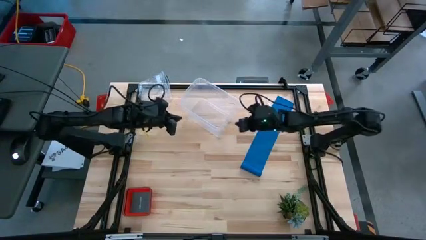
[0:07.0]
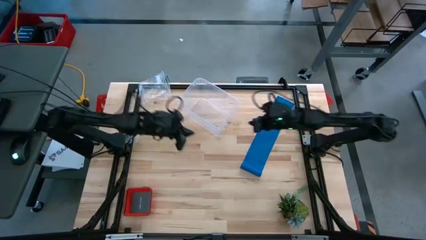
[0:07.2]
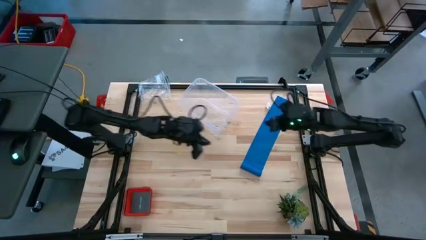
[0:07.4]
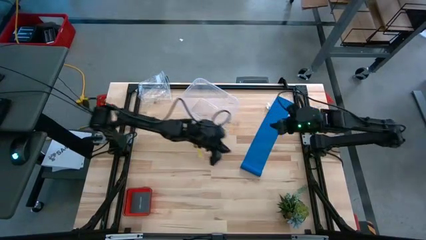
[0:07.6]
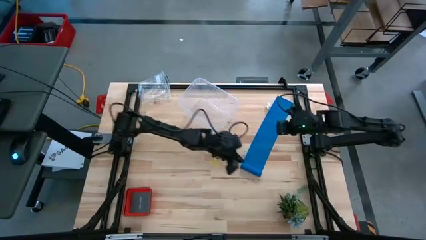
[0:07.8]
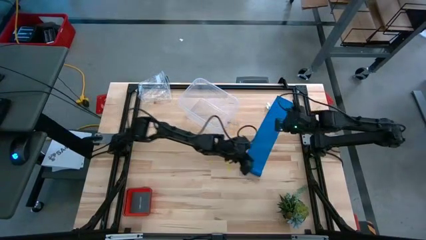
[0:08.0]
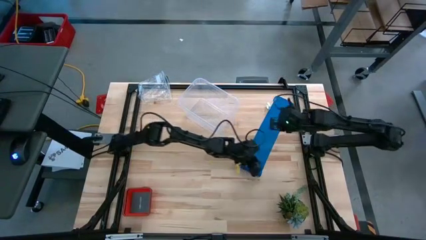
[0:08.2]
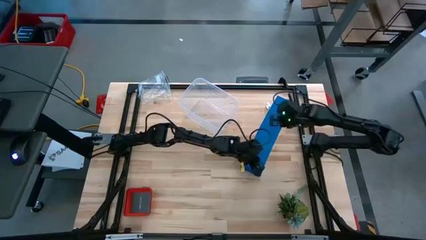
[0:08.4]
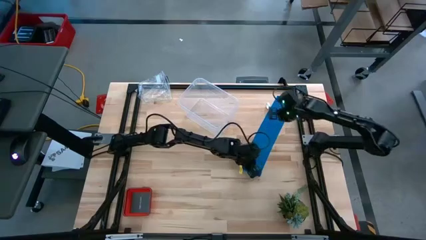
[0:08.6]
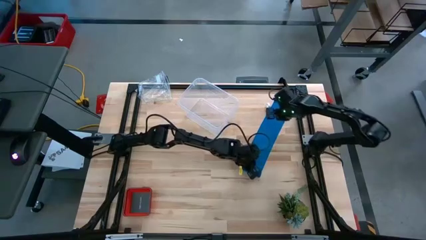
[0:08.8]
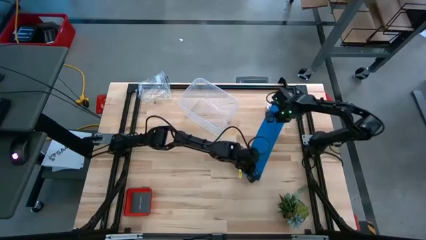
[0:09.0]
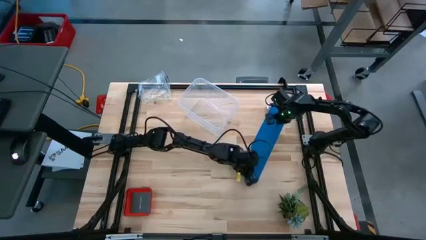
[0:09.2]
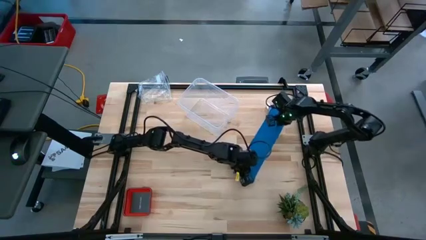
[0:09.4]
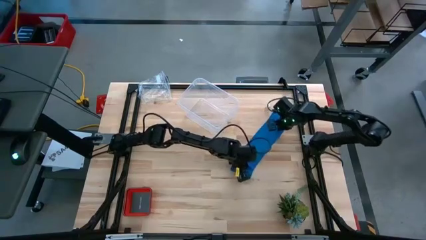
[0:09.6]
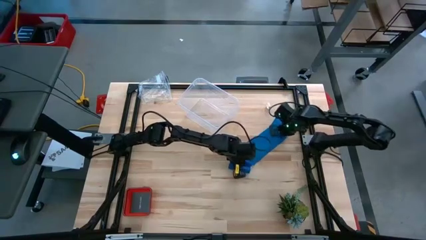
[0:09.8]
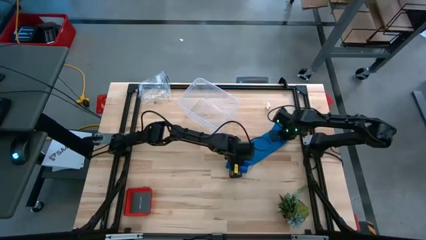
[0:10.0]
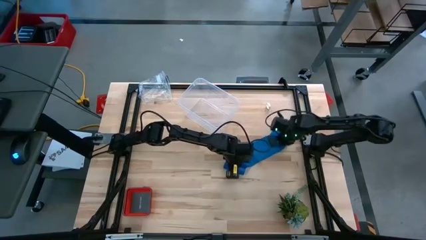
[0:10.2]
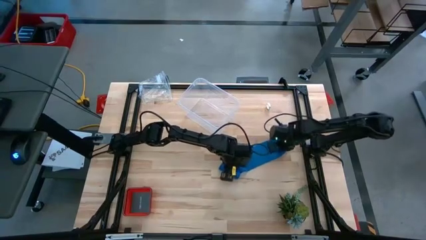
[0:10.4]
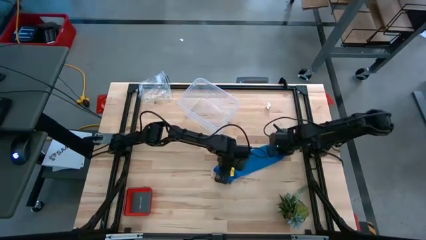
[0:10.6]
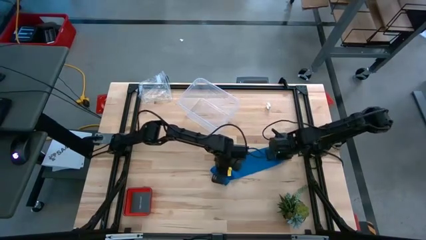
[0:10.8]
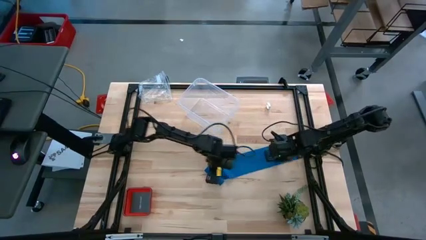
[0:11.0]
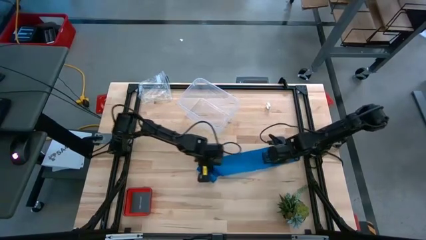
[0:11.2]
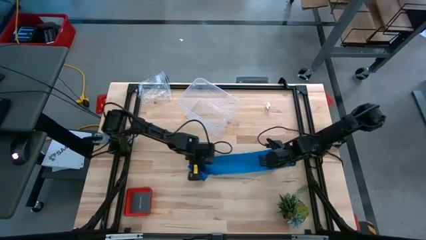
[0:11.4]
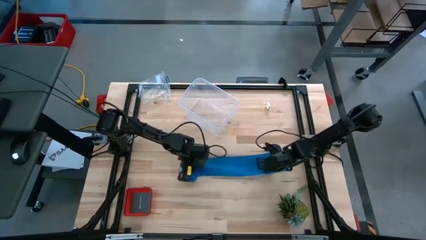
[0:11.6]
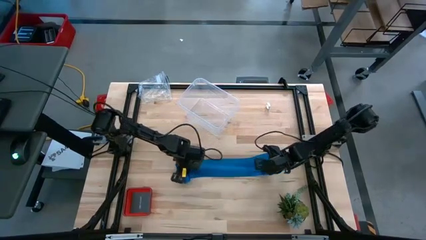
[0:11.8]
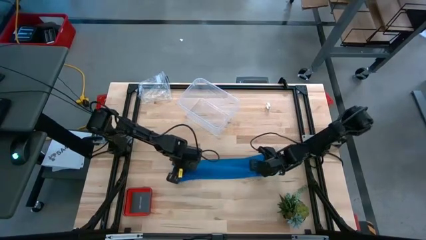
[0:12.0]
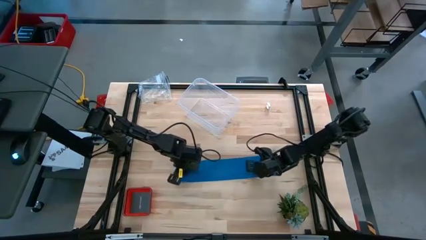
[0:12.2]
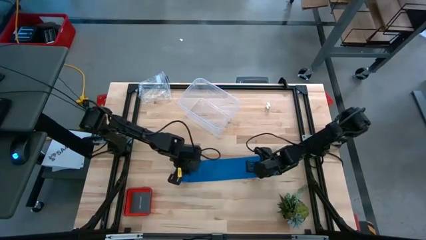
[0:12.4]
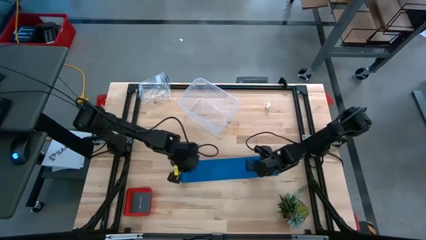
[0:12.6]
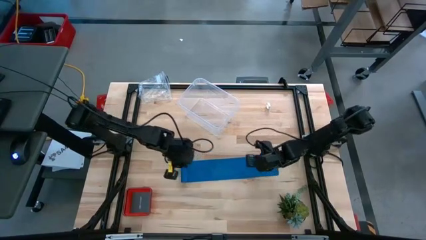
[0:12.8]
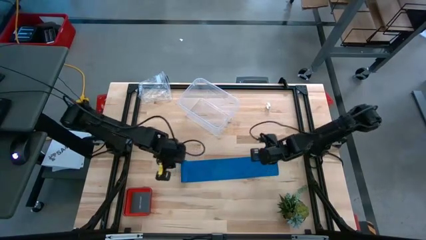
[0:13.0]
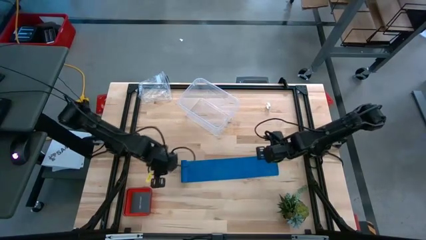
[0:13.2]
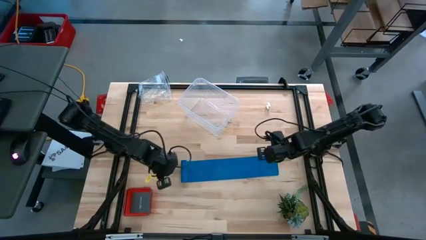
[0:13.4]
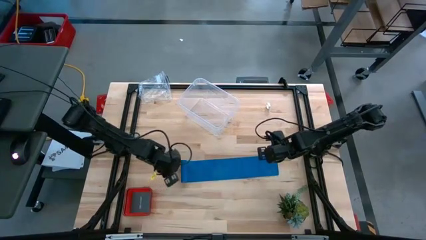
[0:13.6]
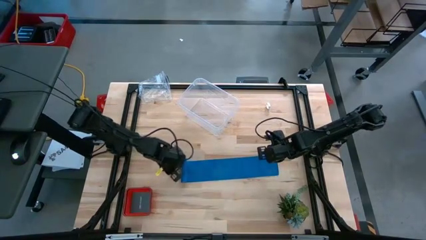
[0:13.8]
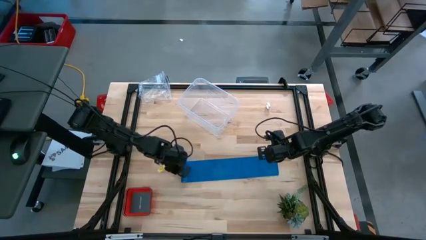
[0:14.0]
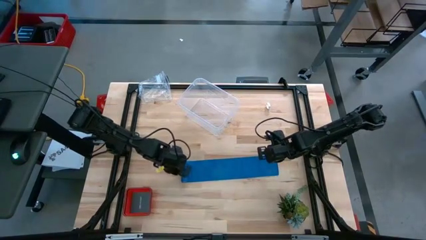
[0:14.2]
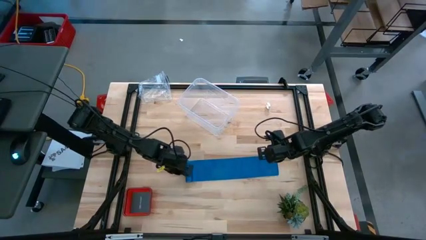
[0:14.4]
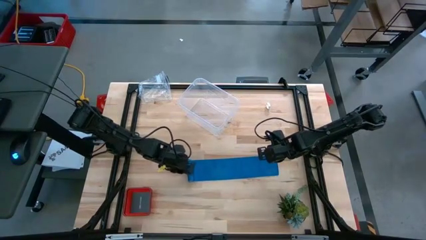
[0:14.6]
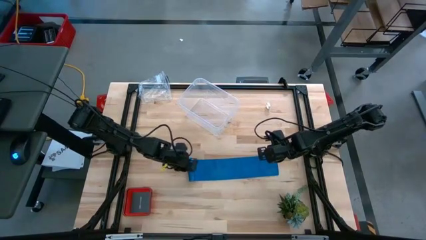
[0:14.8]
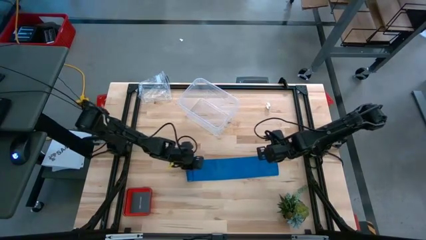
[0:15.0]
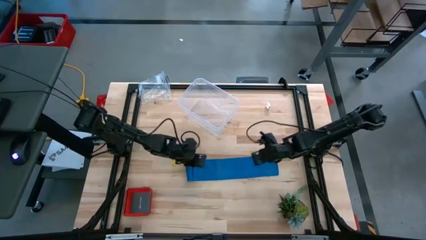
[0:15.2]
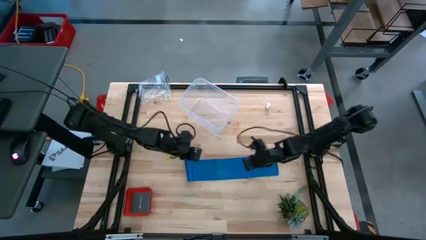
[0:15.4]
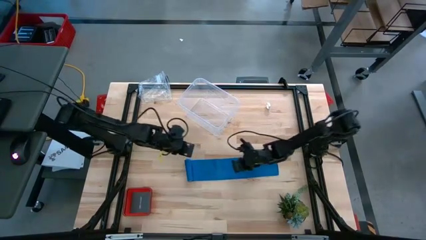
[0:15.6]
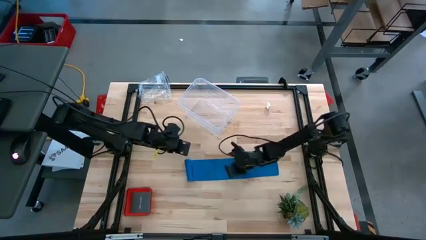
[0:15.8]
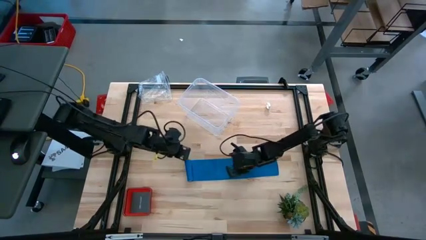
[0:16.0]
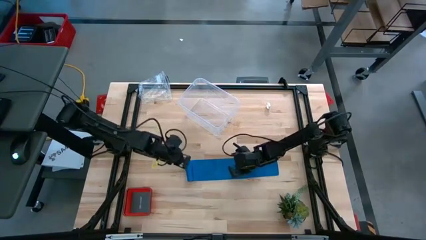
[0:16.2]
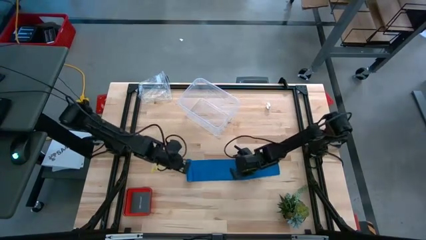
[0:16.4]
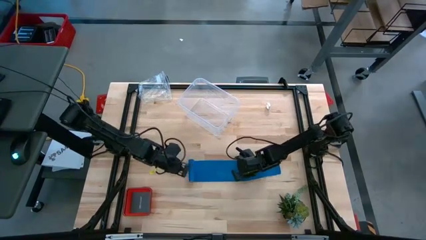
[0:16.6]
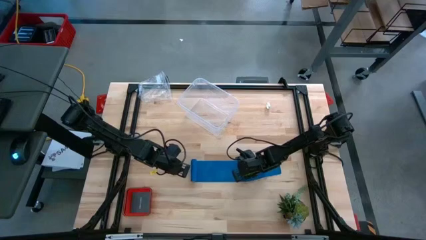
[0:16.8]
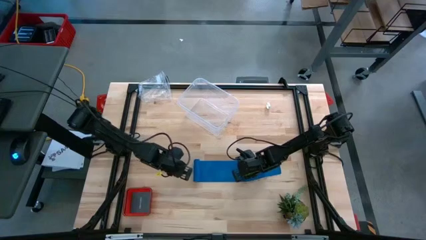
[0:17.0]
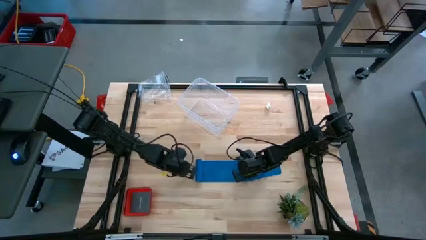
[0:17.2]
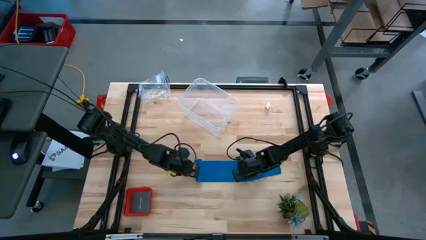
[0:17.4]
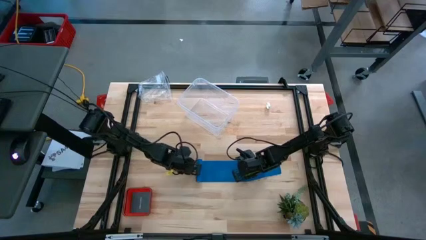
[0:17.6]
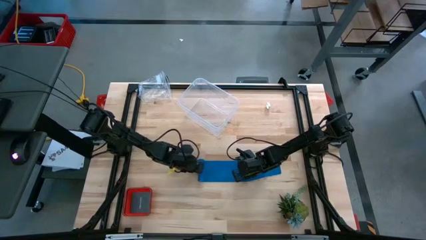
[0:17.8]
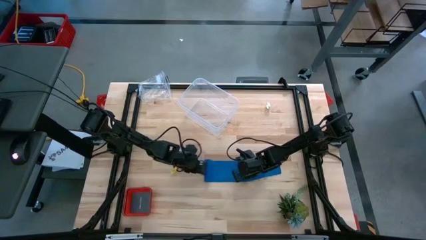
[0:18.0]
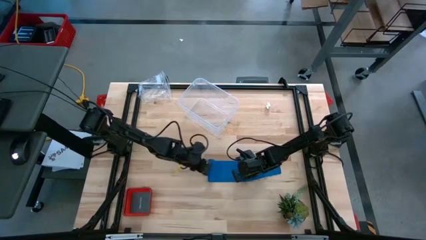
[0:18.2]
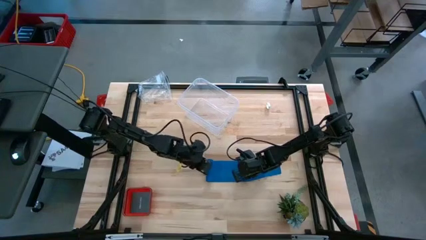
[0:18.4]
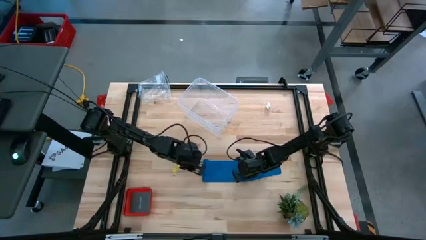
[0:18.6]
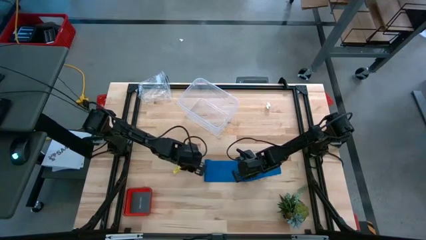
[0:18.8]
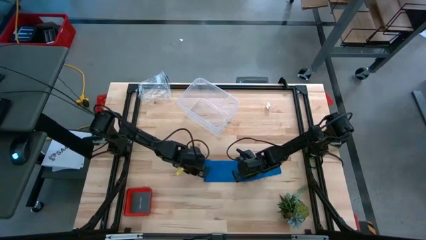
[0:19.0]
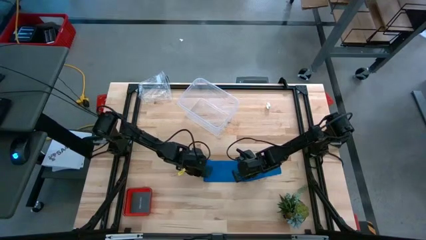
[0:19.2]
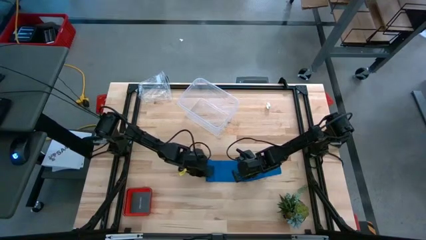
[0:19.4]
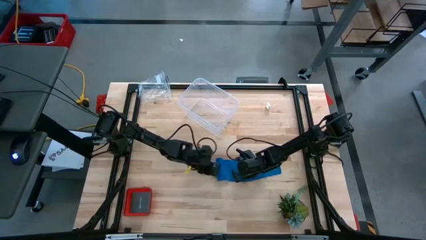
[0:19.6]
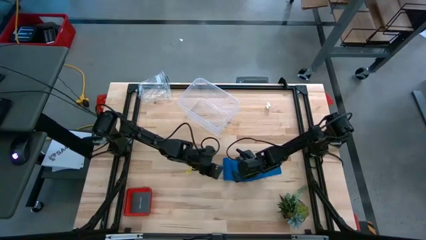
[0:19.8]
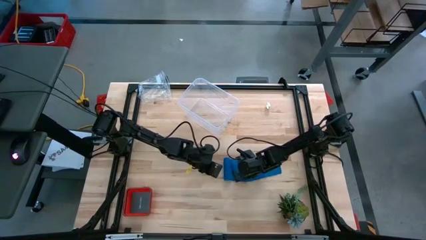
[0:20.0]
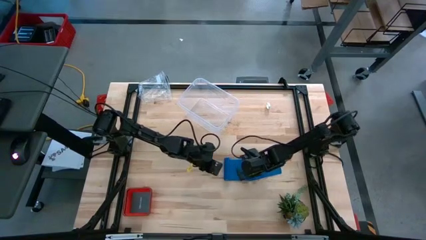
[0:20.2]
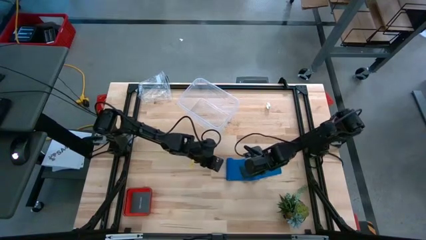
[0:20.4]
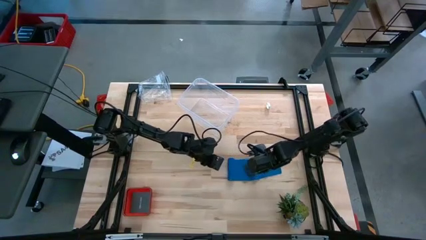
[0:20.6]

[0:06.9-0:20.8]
Task: Roll bandage
Roll the blue bandage
